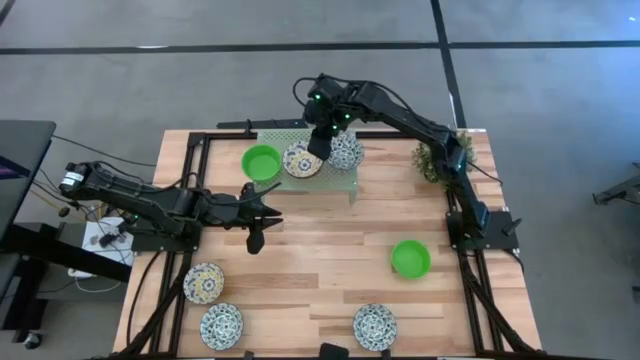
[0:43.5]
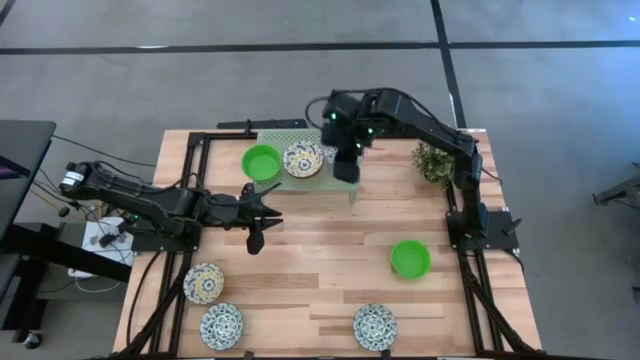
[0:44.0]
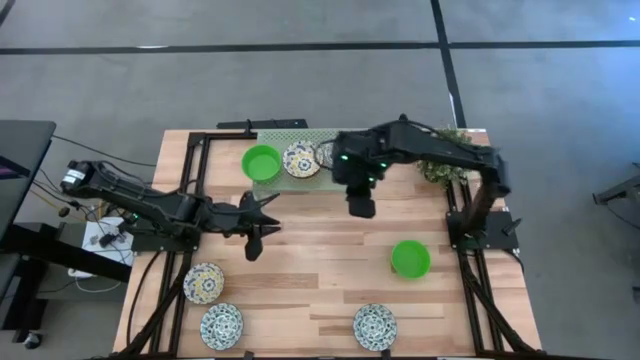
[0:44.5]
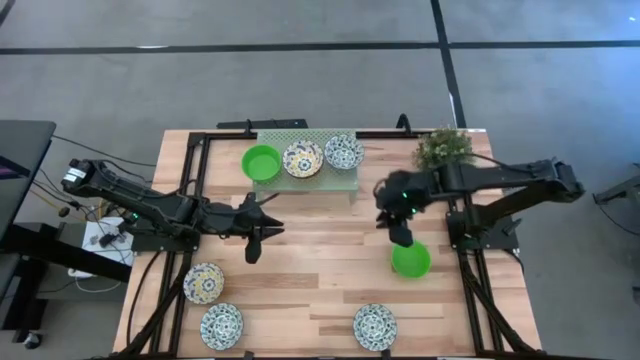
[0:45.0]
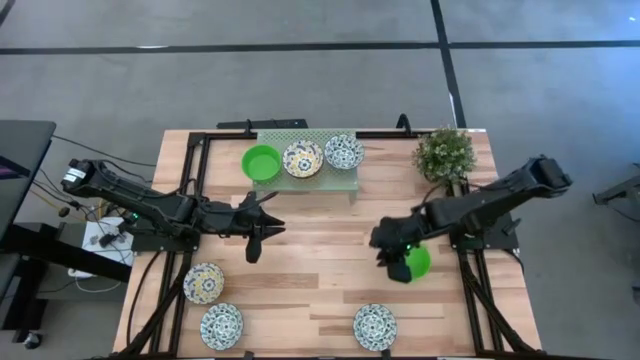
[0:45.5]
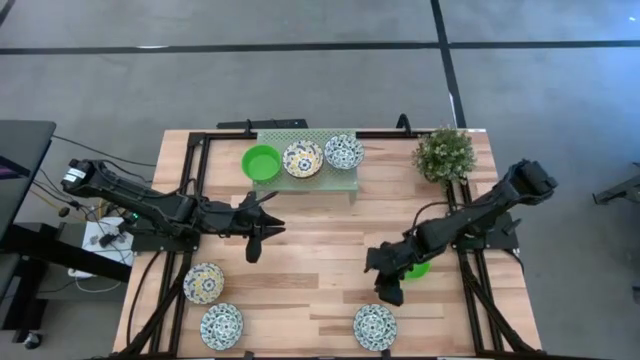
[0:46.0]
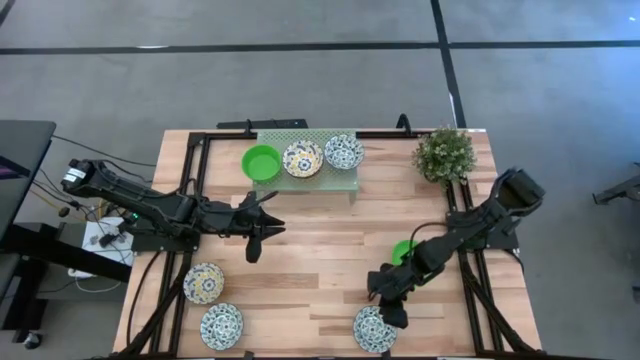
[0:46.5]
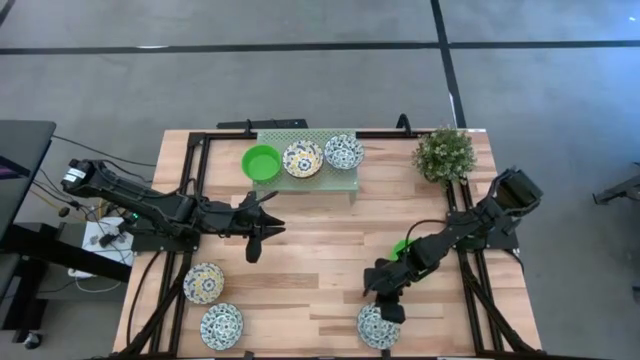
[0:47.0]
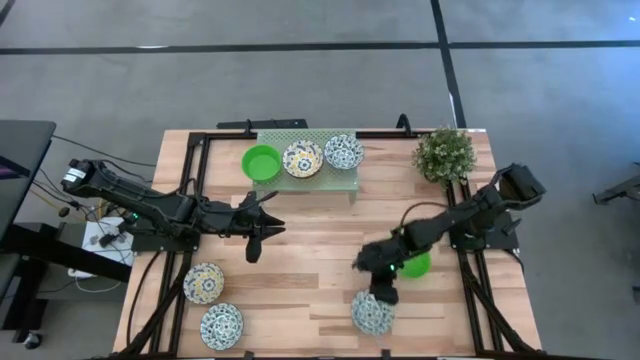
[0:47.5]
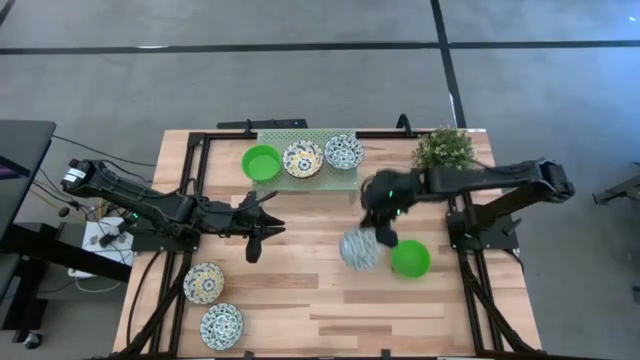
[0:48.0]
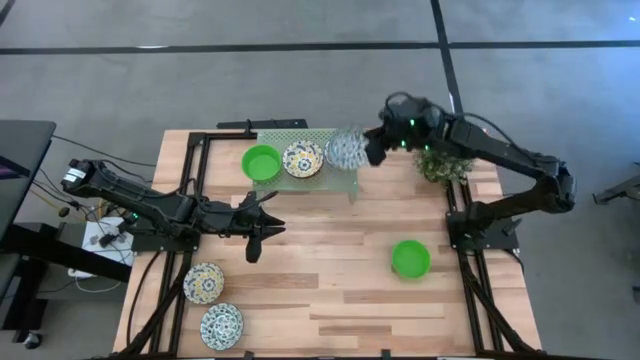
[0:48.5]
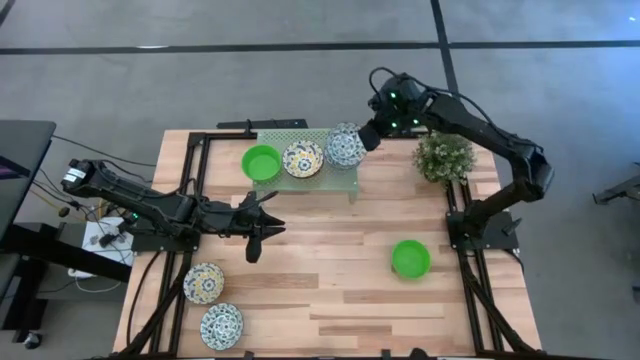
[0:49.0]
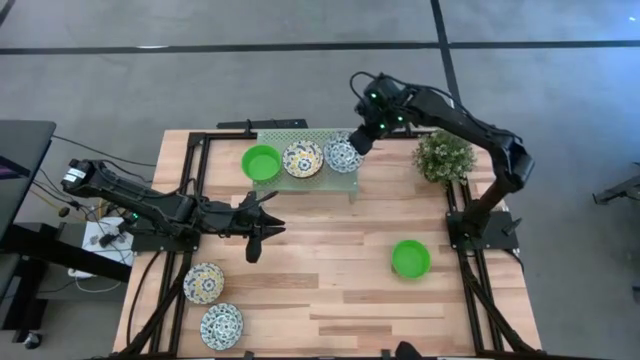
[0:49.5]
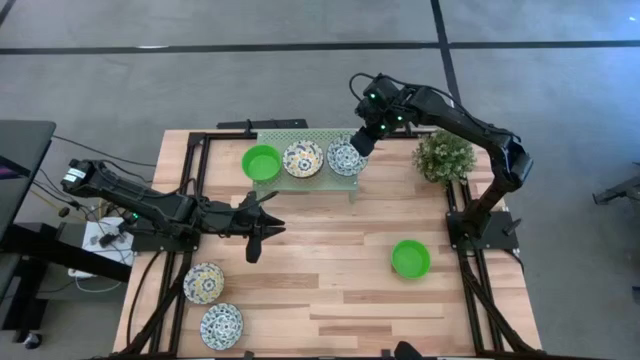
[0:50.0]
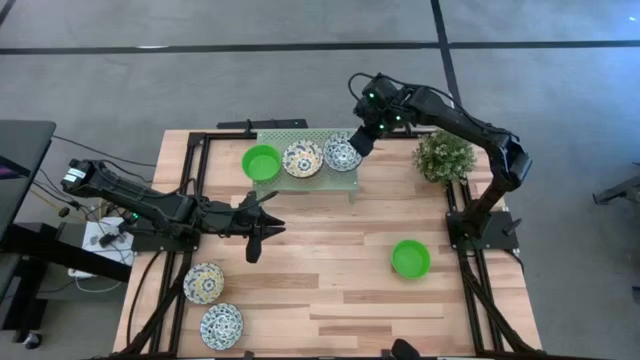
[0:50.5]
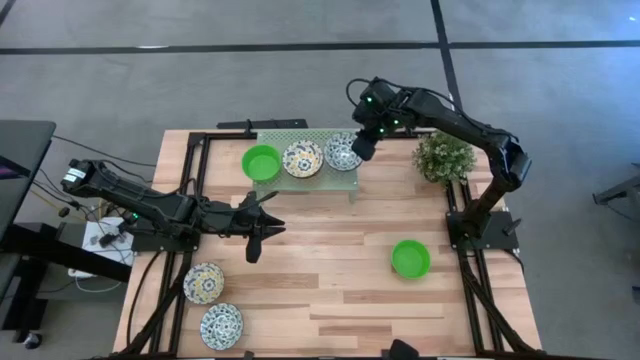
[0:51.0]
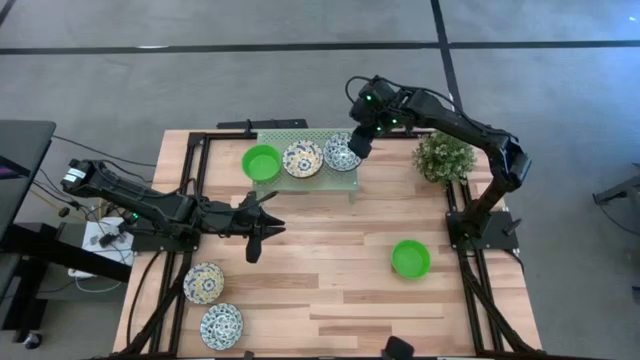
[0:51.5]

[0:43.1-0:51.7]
Task: Pick & Place Mini bowls
Stack the right blue patterned bowl on the blue patterned bowl on the shelf

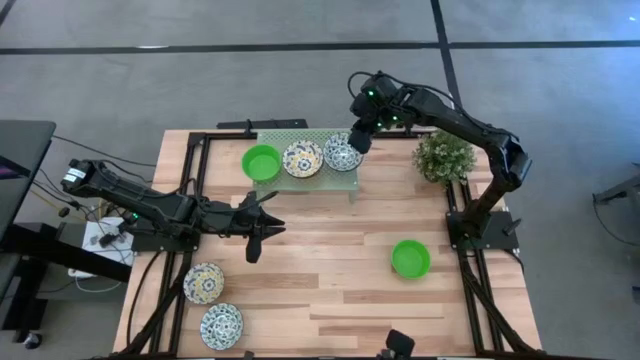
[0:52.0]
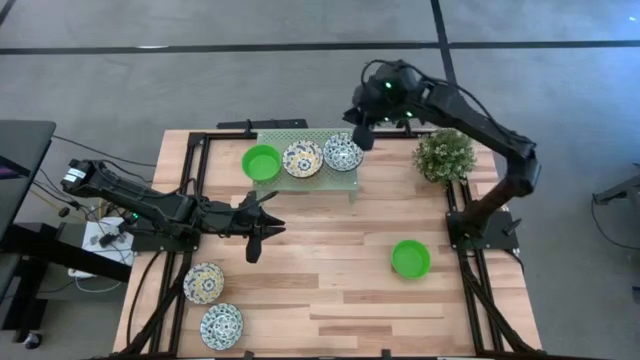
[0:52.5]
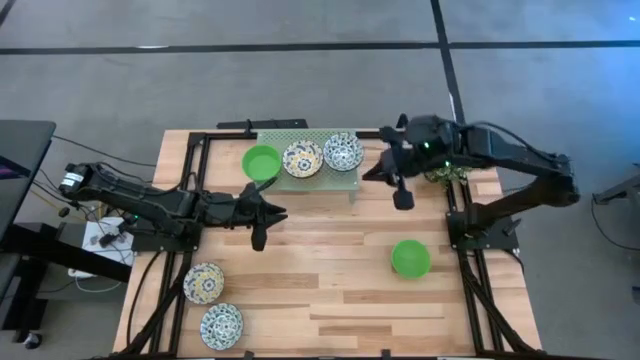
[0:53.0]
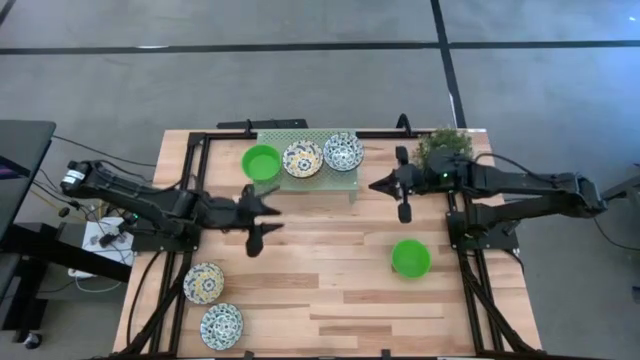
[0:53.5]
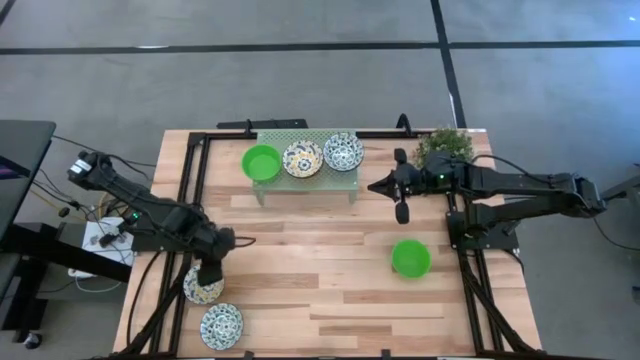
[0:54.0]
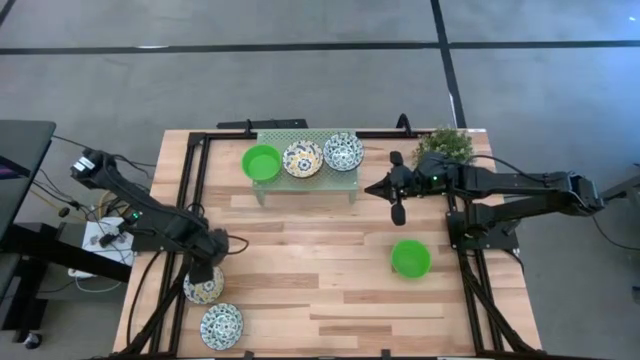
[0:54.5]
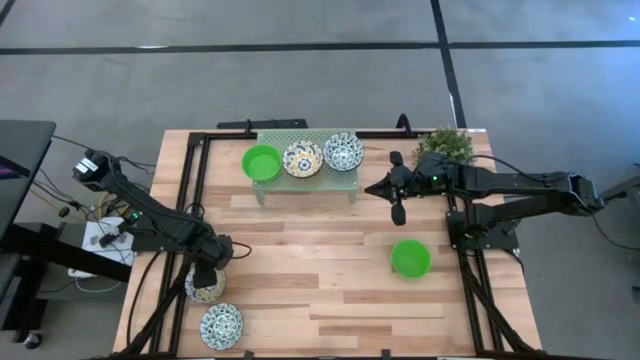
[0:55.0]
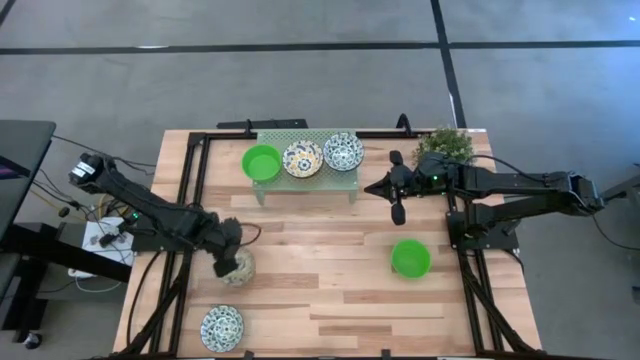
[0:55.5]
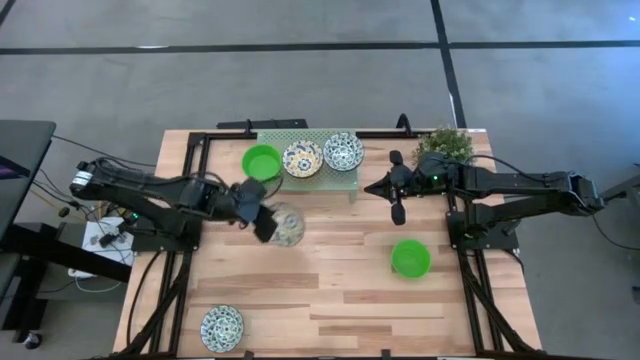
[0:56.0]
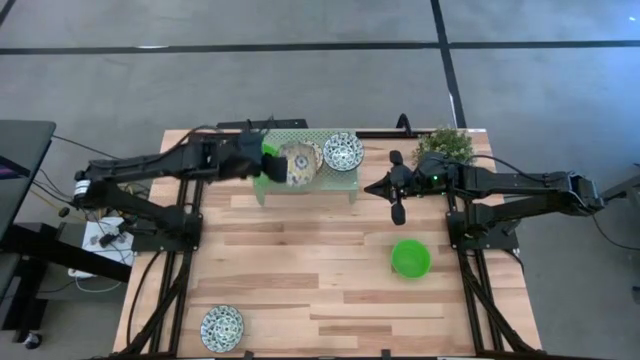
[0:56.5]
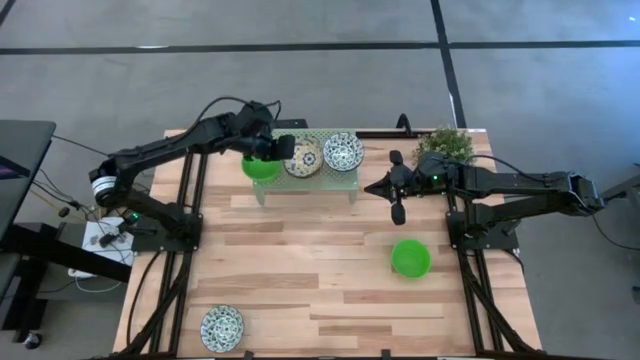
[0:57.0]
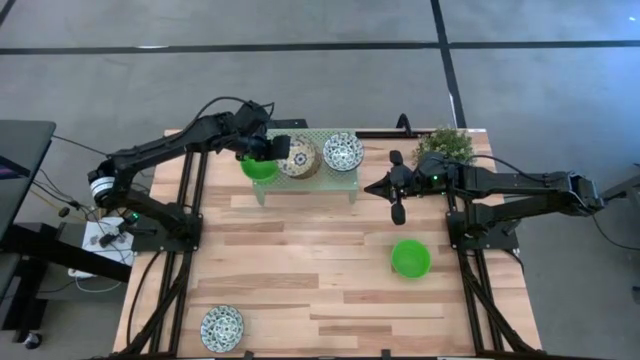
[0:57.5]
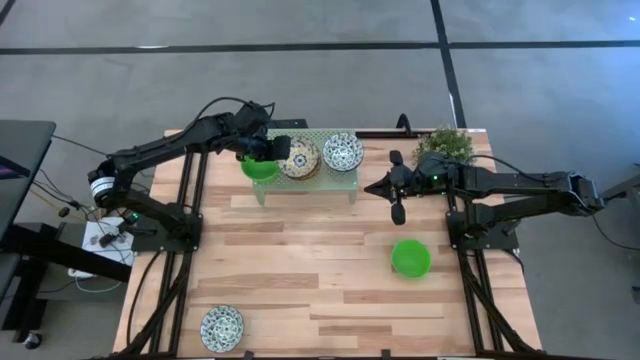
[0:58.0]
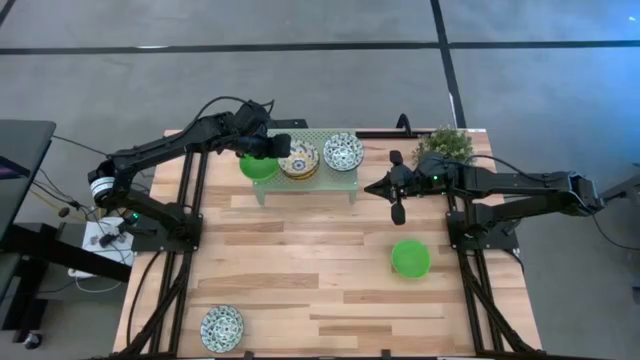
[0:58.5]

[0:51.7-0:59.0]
Stack the yellow patterned bowl on the yellow patterned bowls on the shelf

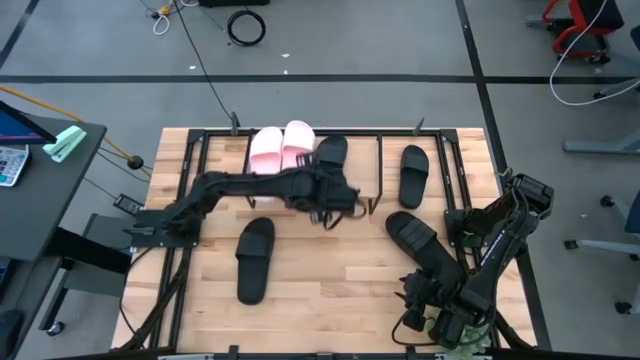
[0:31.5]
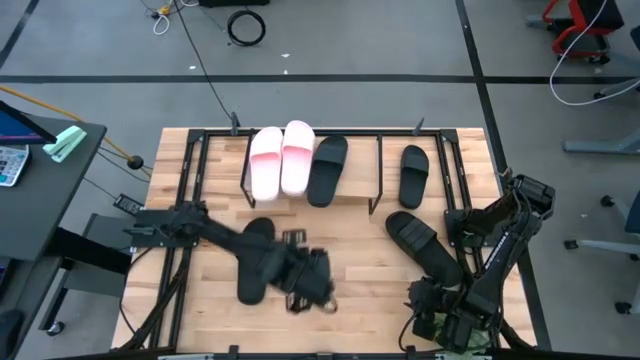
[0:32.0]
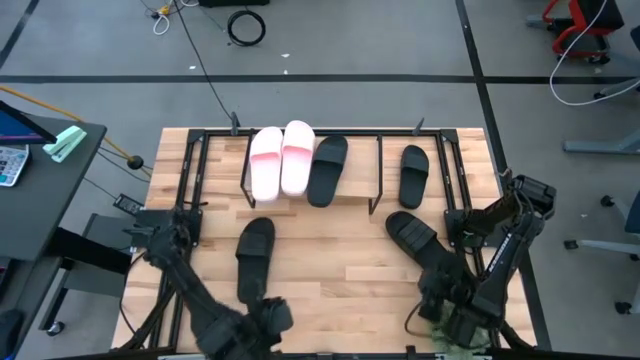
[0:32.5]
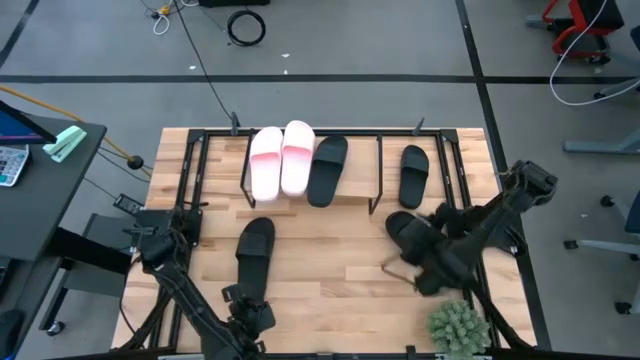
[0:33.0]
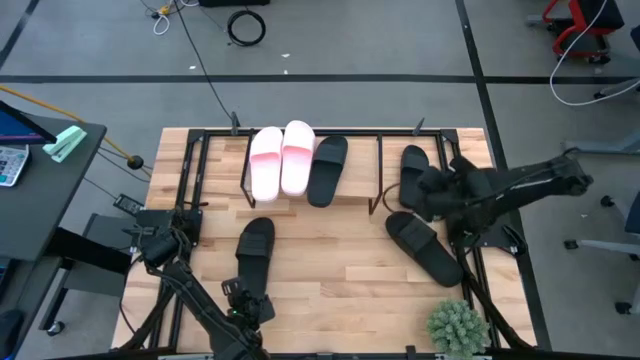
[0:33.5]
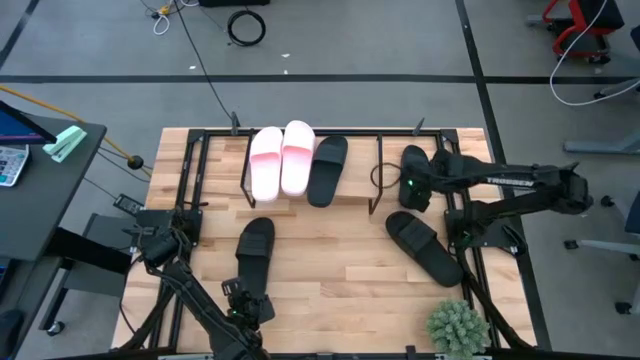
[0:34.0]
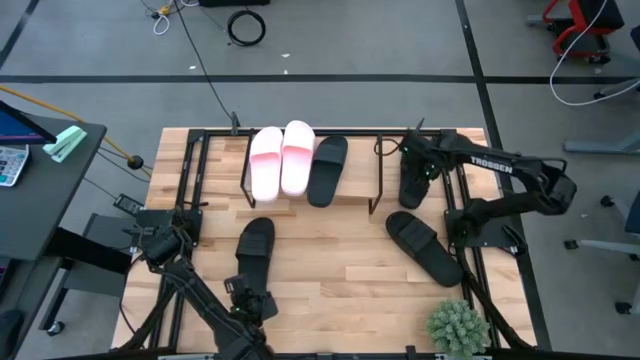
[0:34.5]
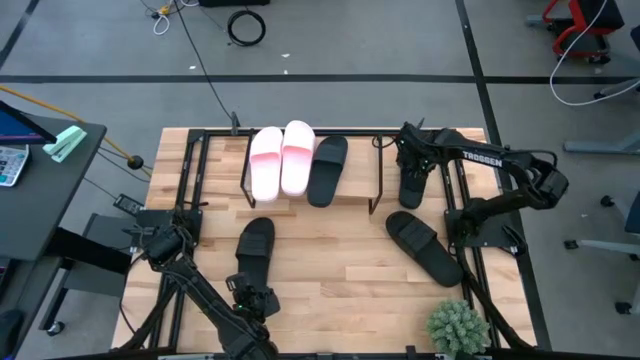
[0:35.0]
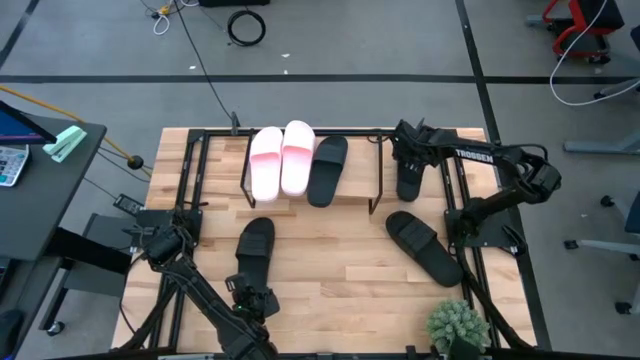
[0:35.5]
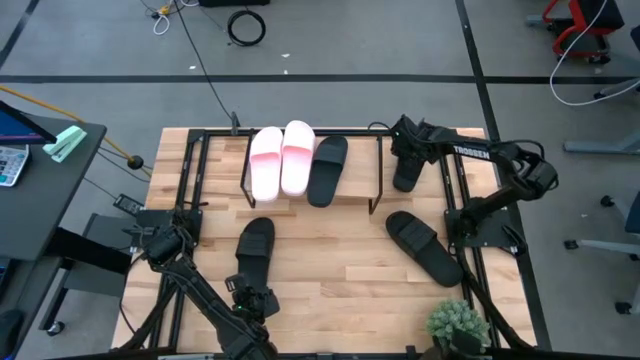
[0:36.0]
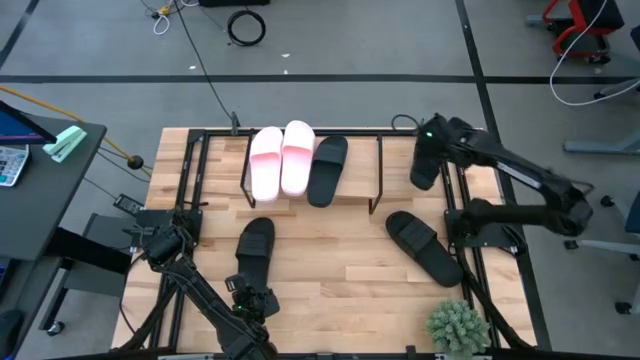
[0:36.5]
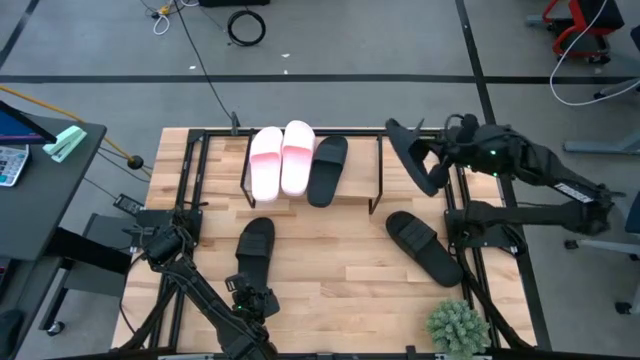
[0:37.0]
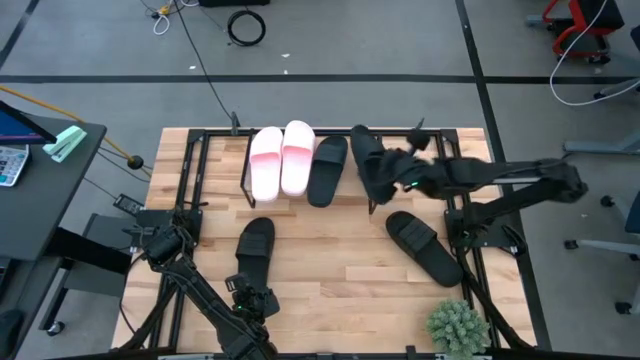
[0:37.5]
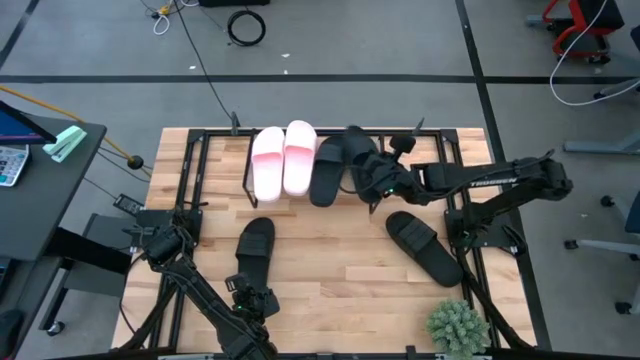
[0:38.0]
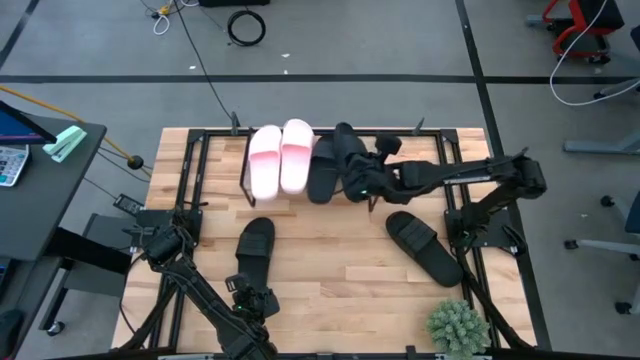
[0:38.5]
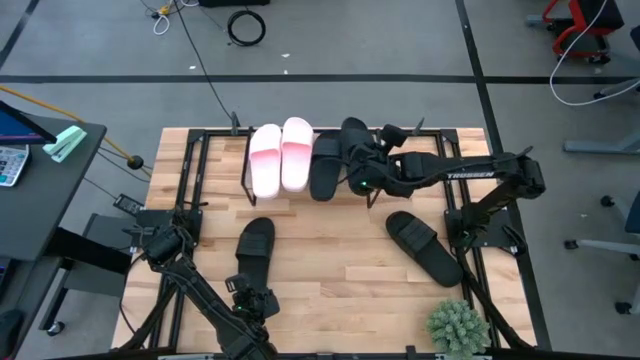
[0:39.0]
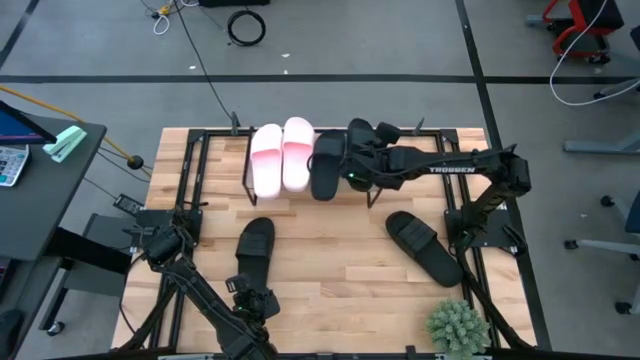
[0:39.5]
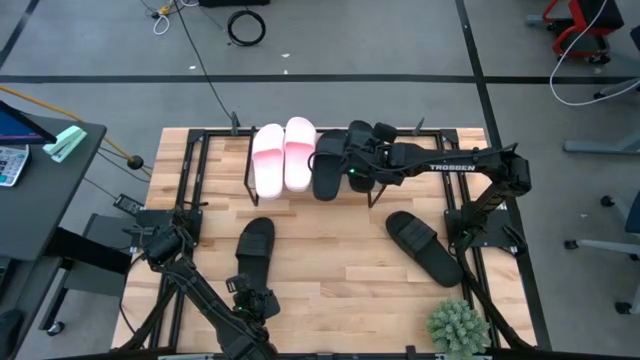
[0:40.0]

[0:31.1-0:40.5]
Task: Pick and place slides into the shelf
Put the top right black slipper on the shelf
